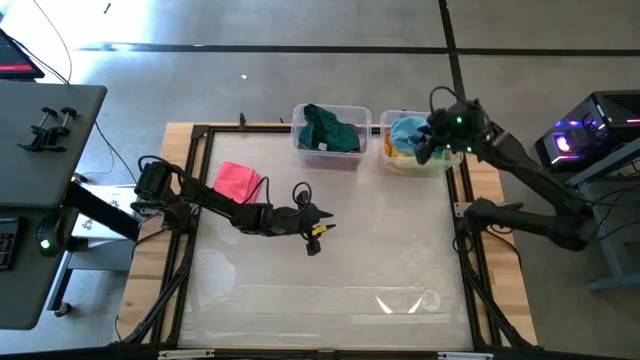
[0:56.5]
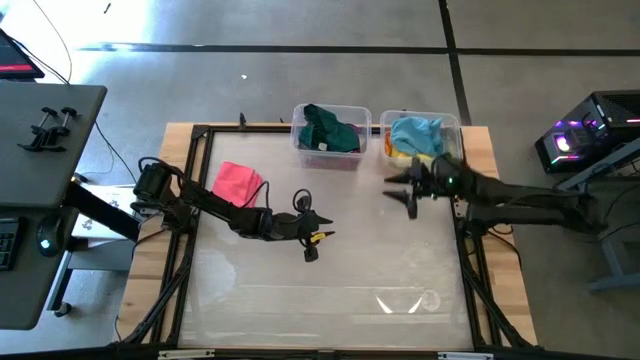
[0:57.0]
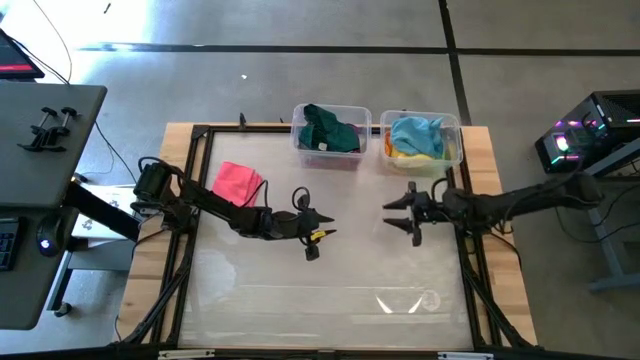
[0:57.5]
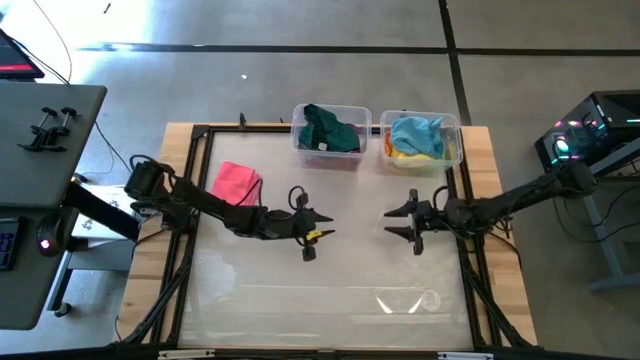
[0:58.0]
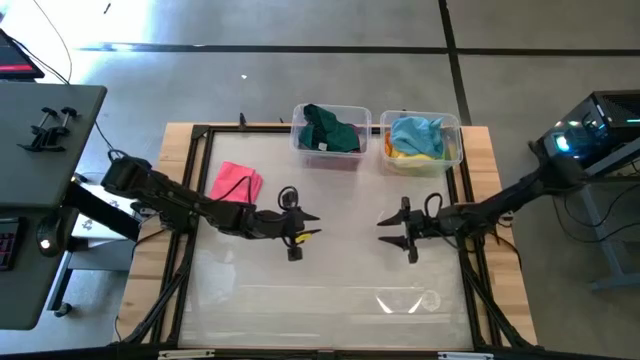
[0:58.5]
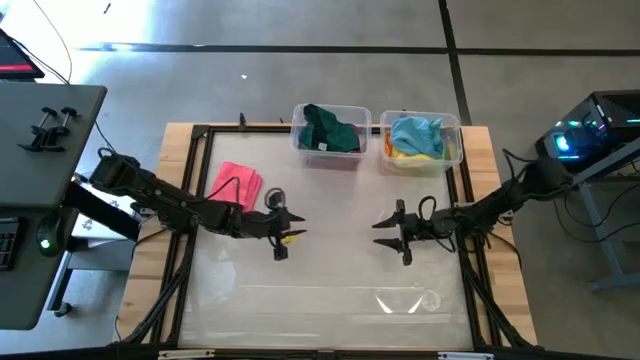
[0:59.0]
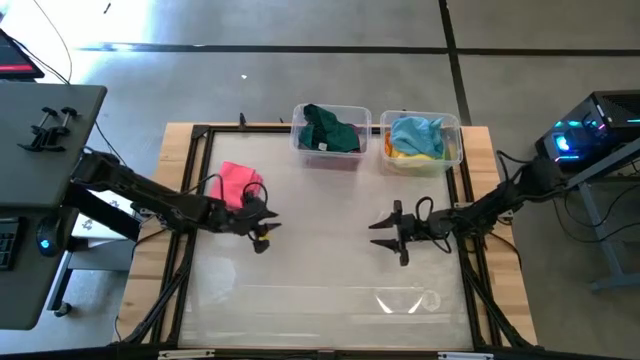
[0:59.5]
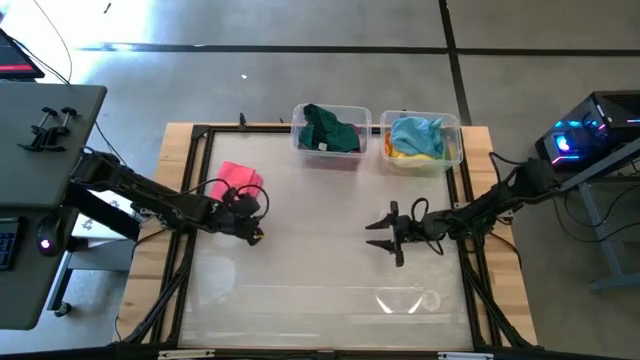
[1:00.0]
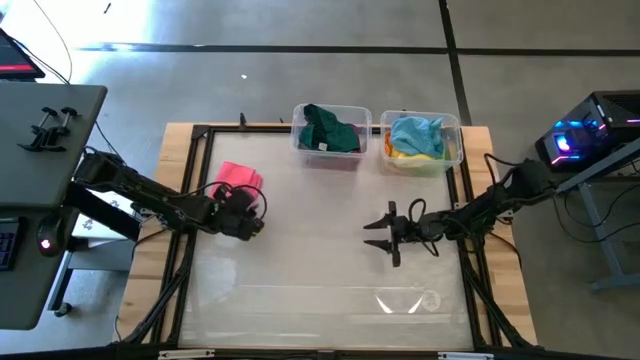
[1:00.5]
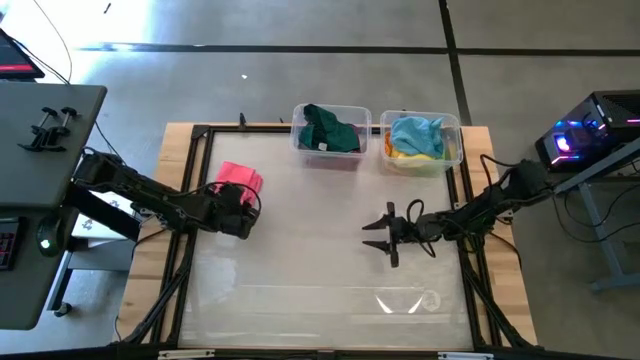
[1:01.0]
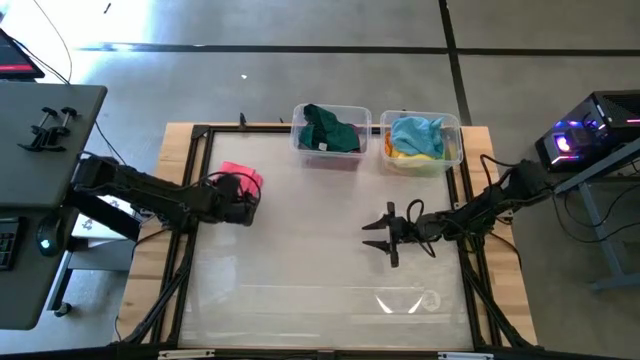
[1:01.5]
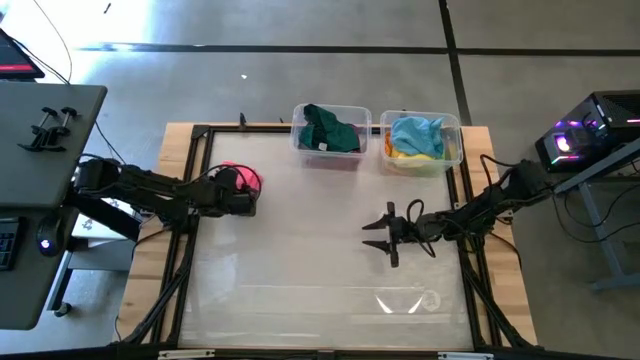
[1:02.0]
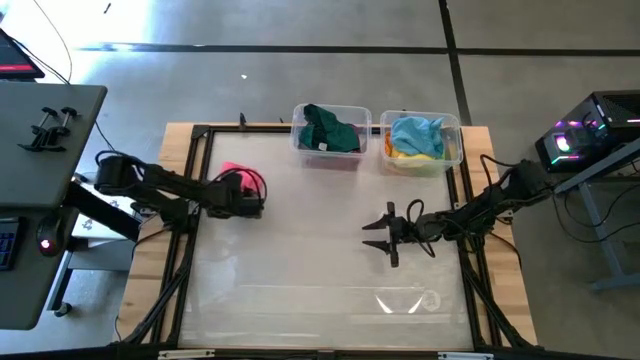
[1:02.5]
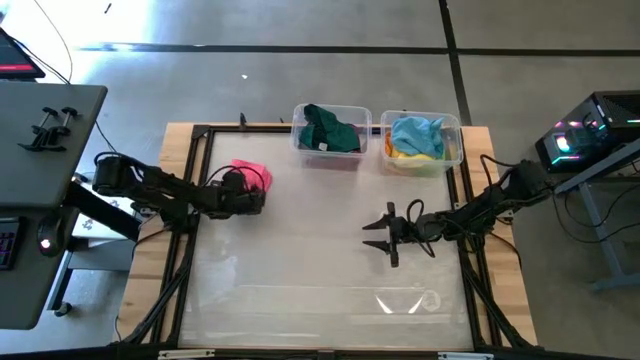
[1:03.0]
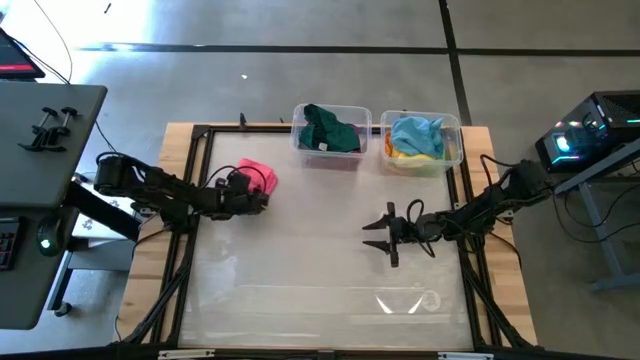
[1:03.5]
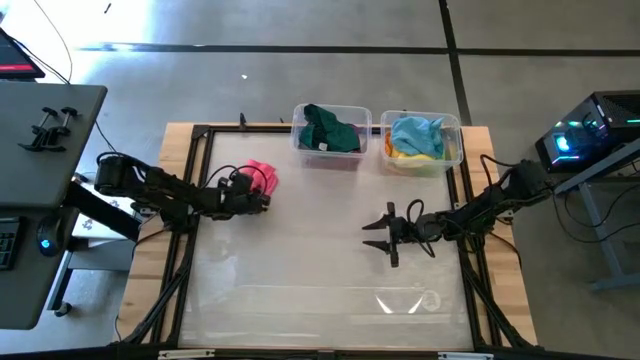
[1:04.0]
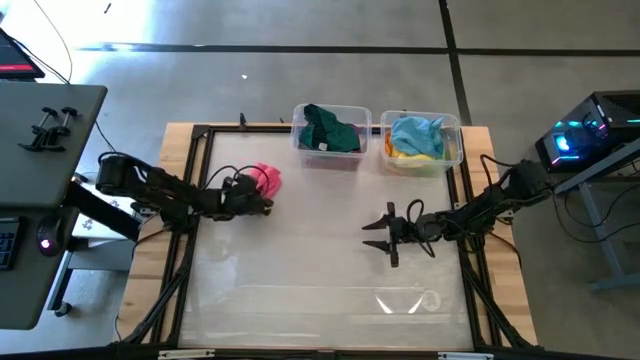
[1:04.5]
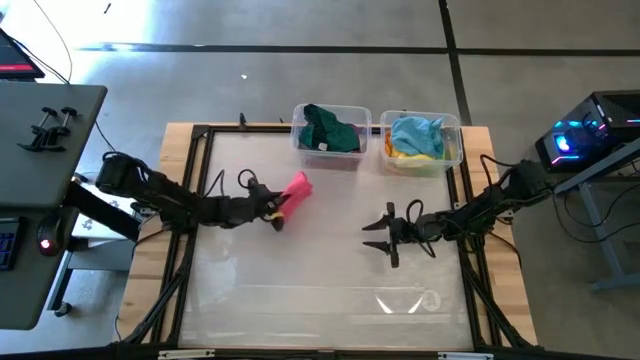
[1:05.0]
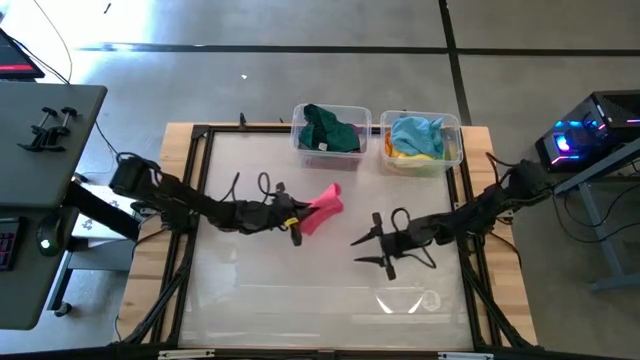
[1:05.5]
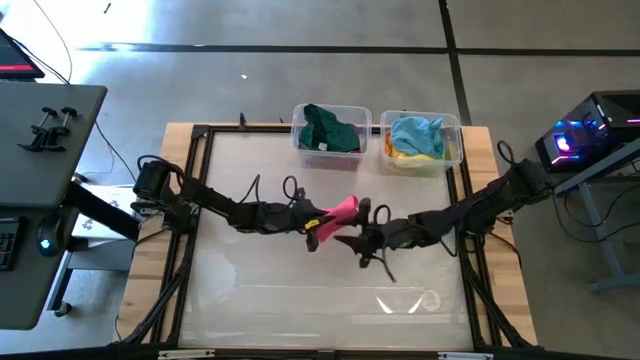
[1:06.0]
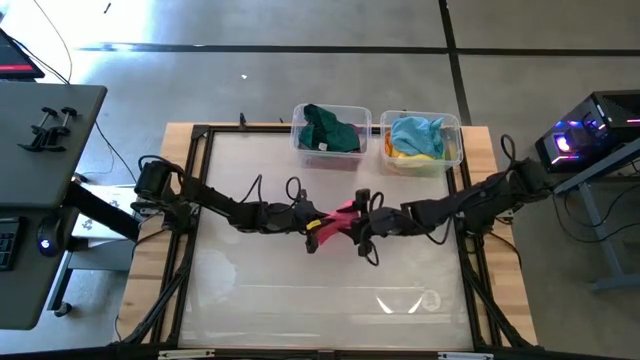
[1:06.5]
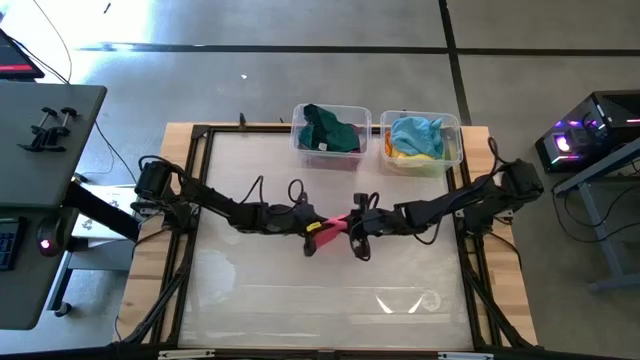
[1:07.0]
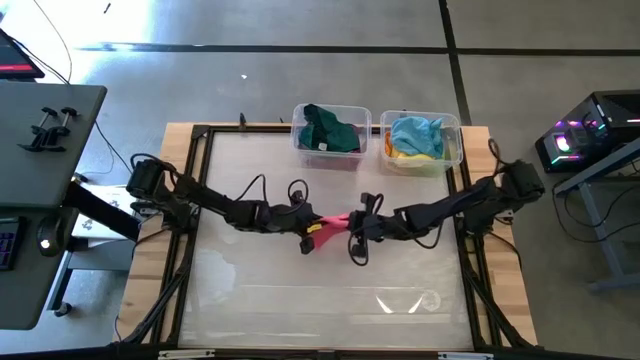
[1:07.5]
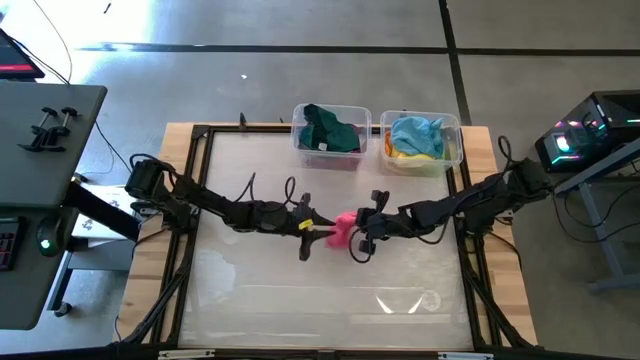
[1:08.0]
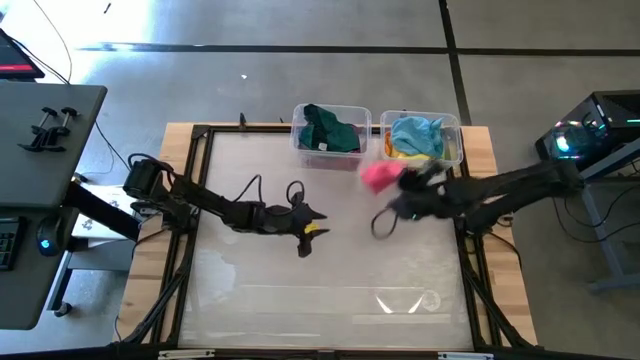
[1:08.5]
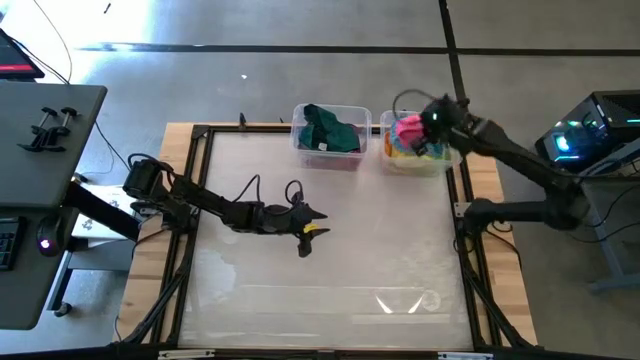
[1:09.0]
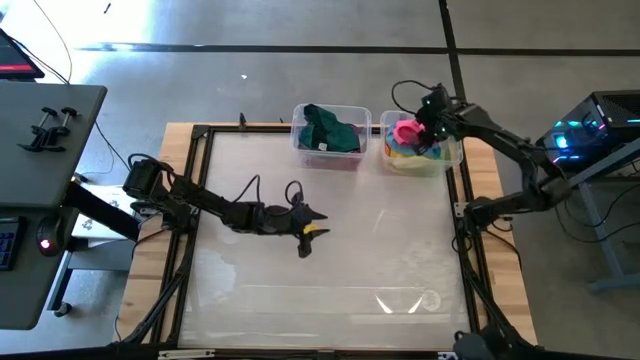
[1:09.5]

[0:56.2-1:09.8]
Task: Sort towels by color in basket
Put the pink towel into the right transparent bin

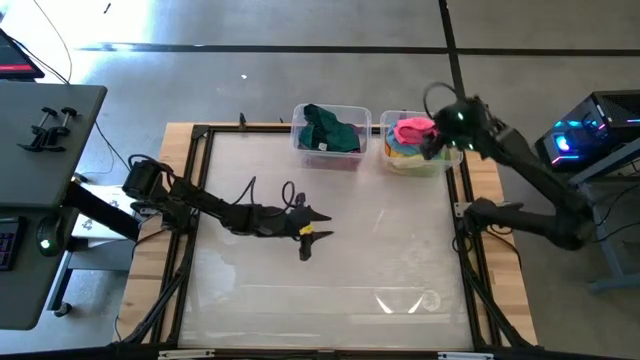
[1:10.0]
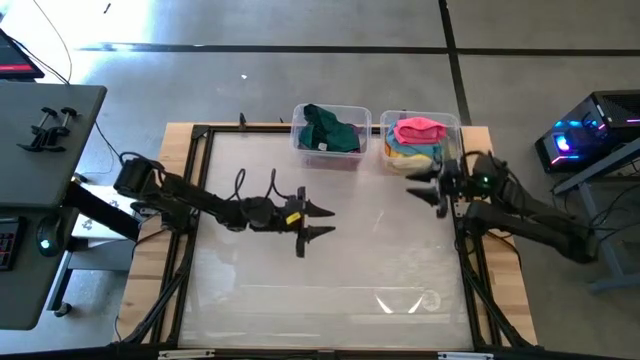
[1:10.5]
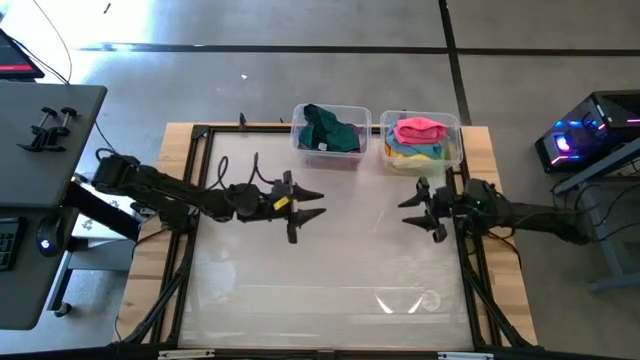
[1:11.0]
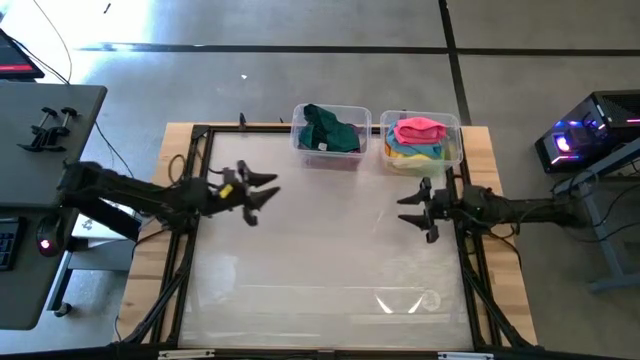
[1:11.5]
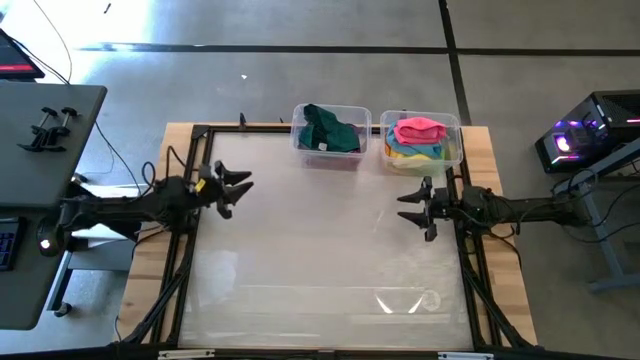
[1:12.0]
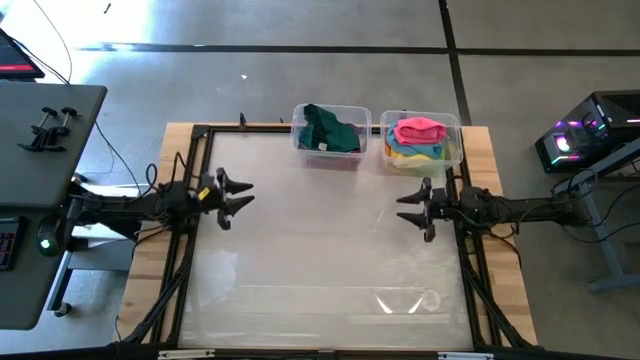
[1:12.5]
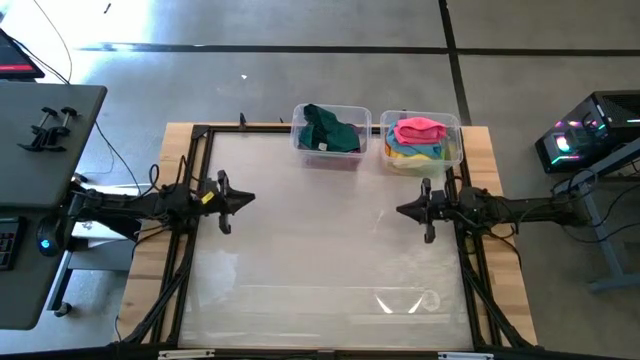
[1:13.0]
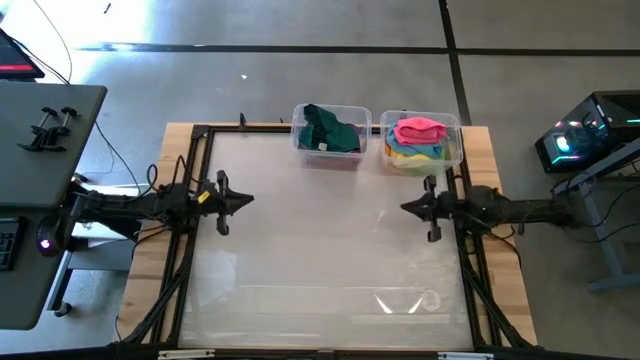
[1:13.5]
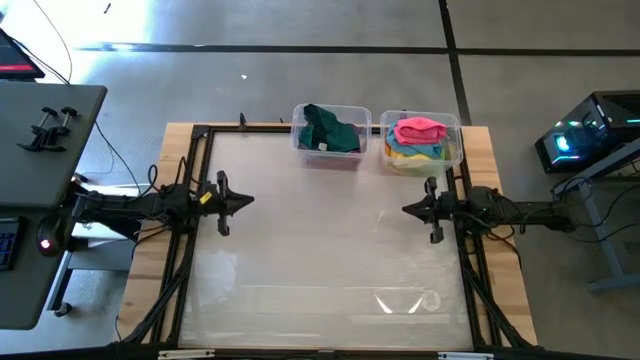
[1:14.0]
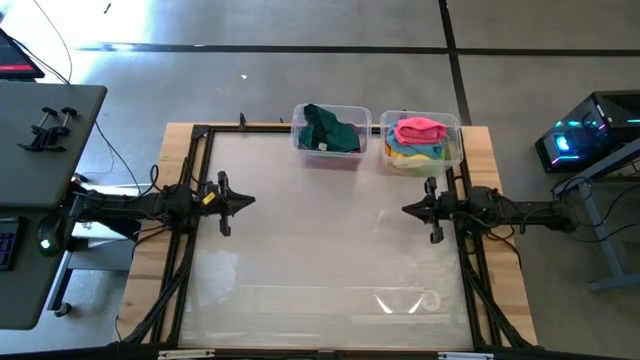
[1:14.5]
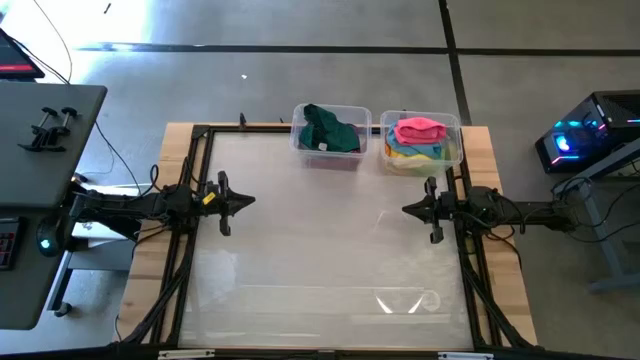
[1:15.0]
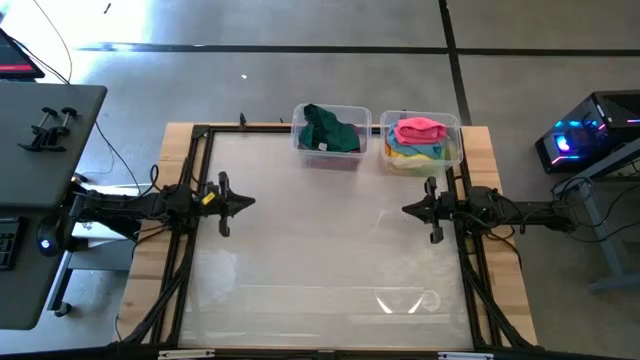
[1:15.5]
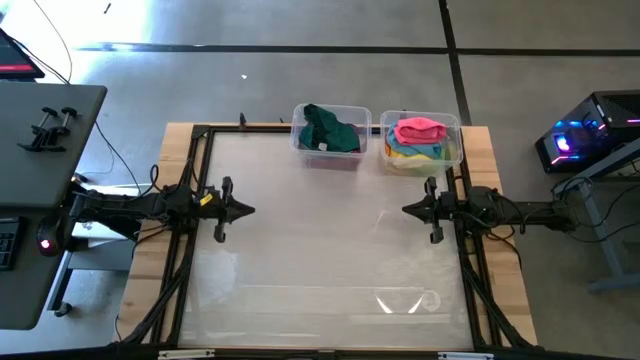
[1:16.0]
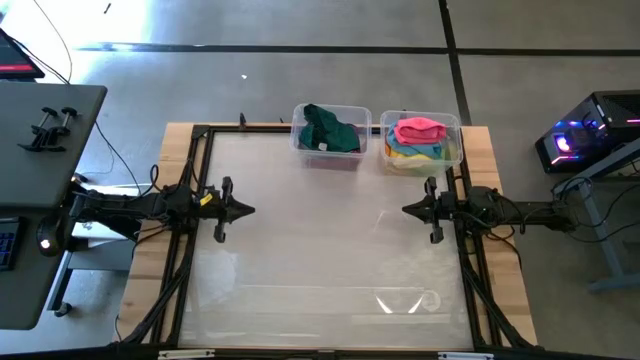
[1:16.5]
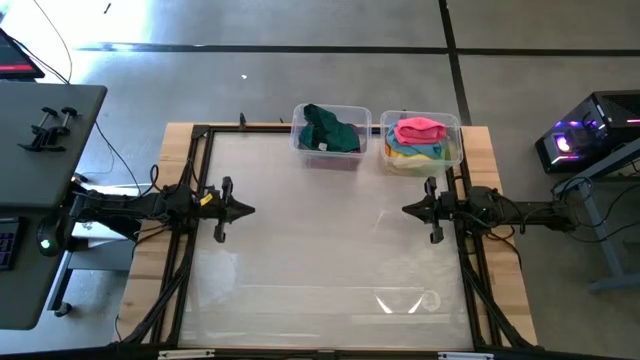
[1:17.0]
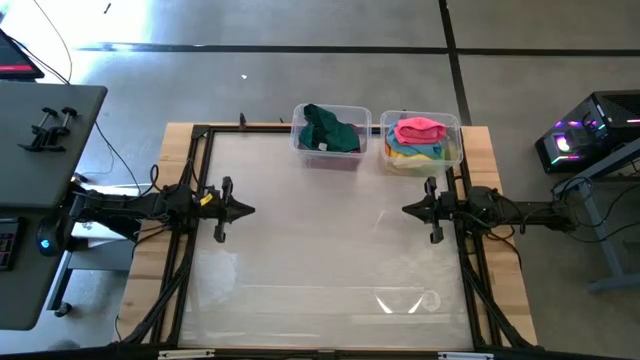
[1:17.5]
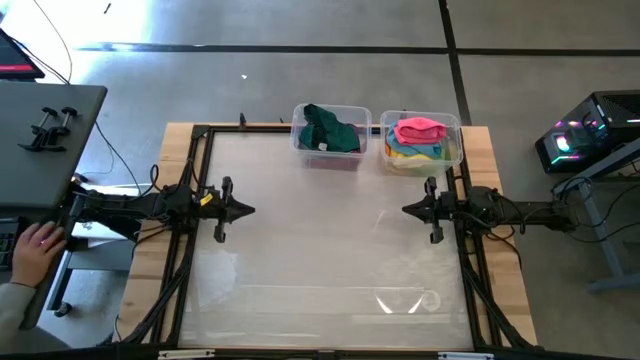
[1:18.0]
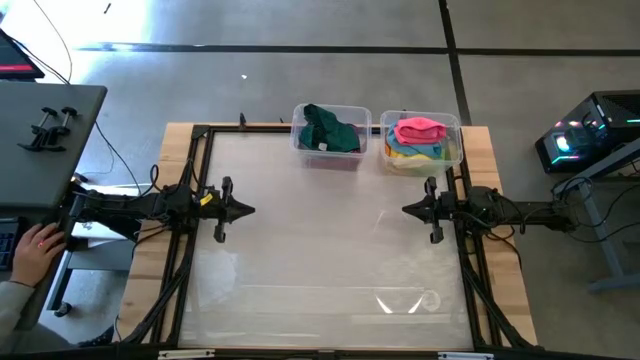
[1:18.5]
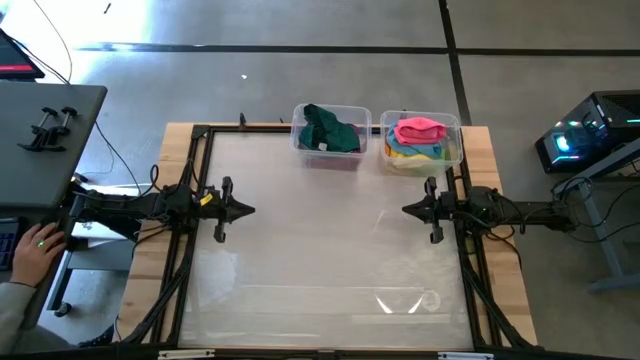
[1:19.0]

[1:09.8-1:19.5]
Return to Home Position
